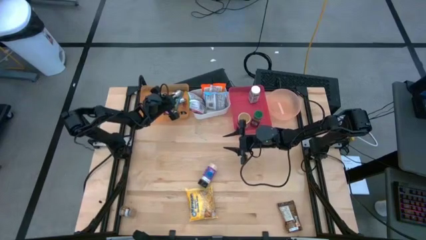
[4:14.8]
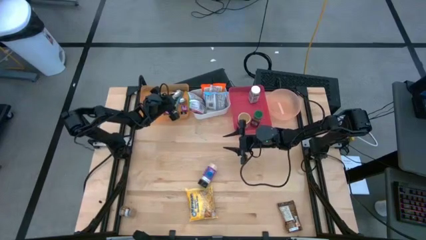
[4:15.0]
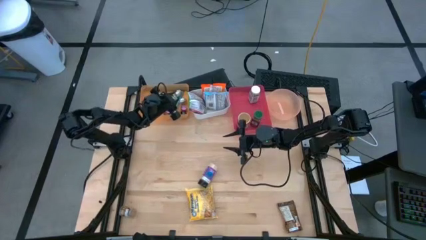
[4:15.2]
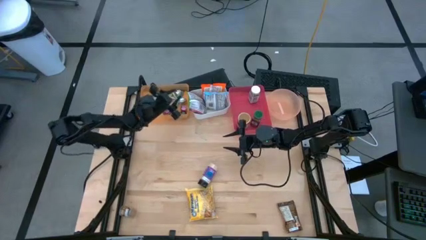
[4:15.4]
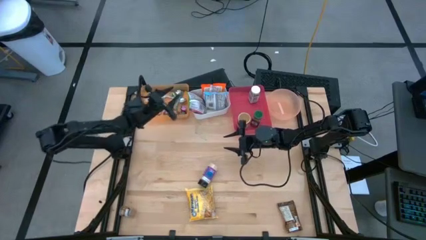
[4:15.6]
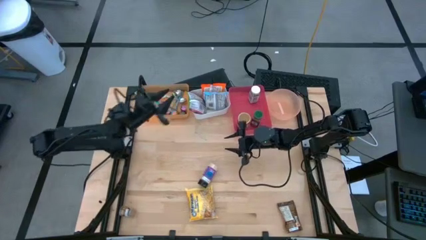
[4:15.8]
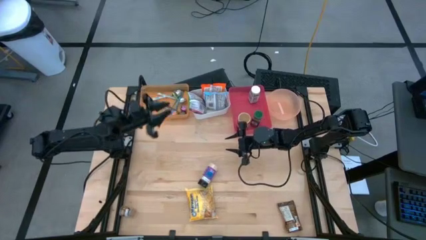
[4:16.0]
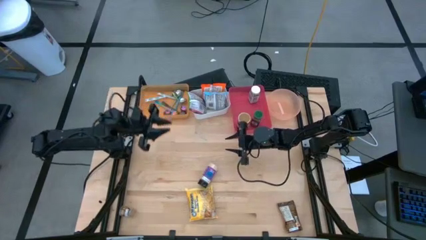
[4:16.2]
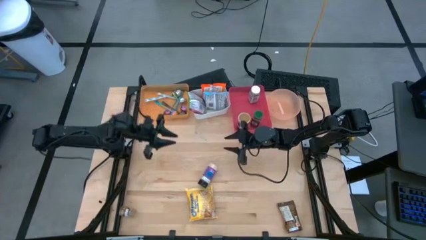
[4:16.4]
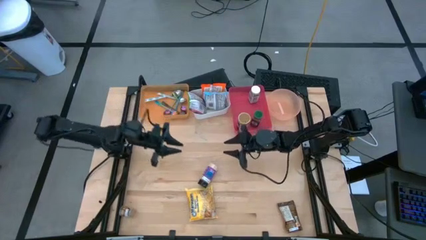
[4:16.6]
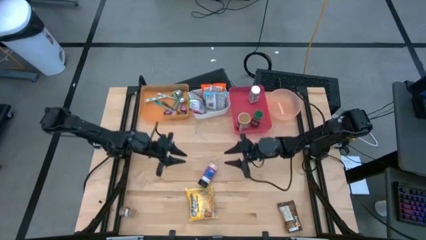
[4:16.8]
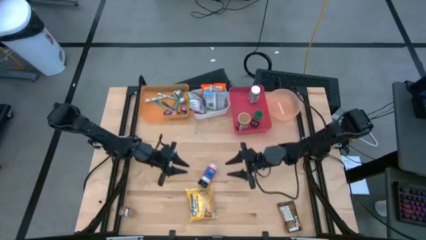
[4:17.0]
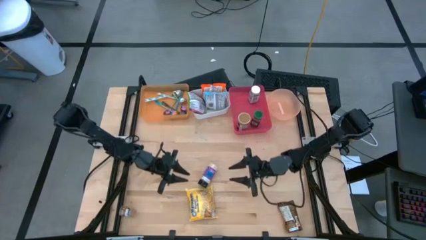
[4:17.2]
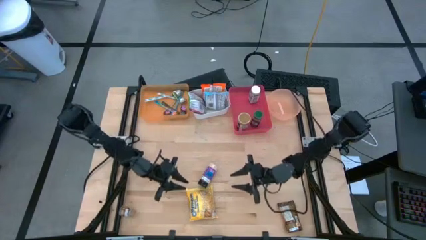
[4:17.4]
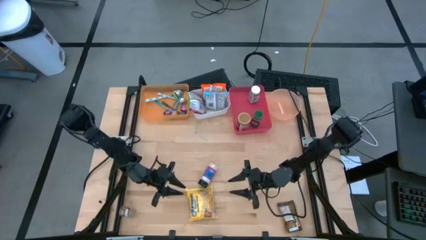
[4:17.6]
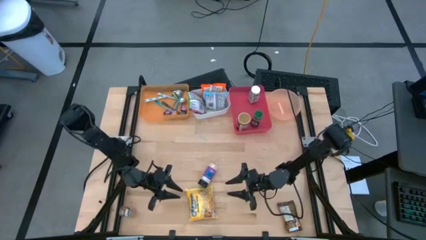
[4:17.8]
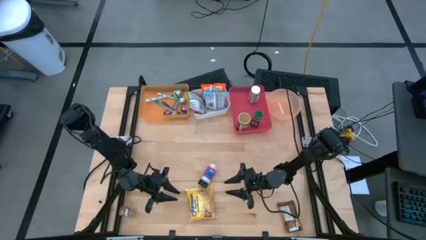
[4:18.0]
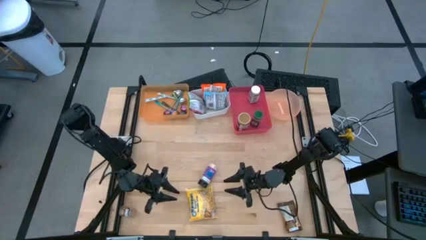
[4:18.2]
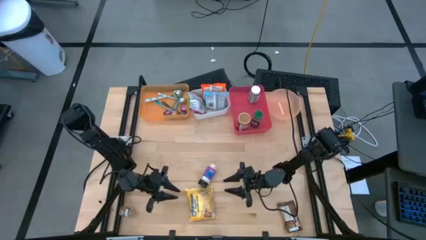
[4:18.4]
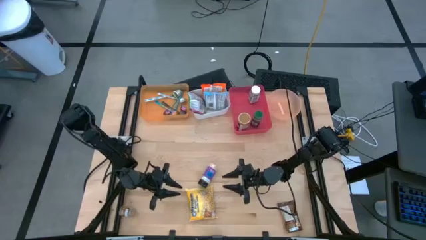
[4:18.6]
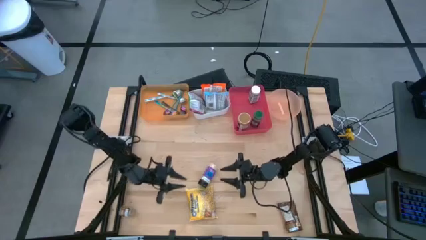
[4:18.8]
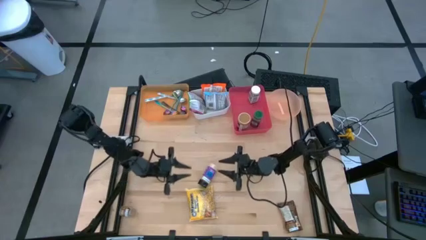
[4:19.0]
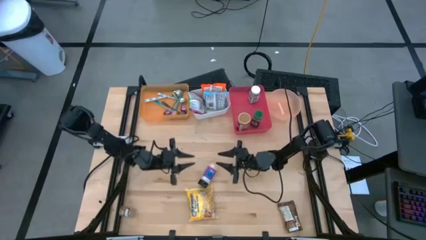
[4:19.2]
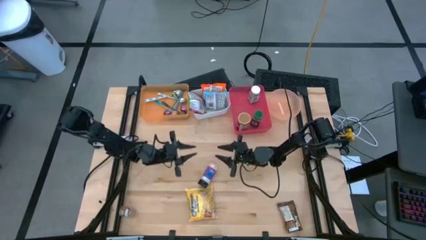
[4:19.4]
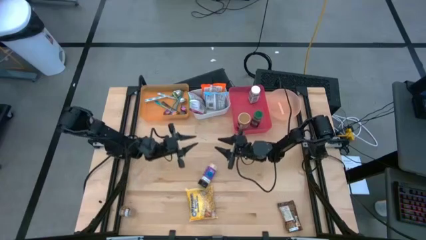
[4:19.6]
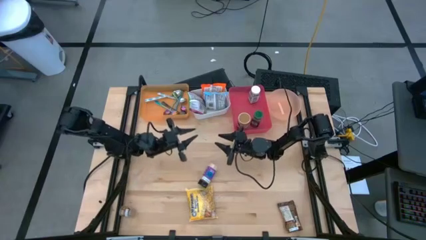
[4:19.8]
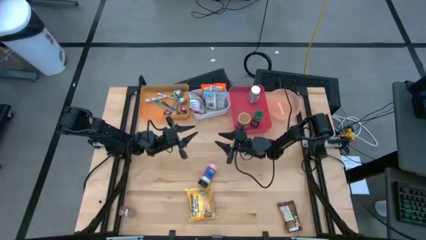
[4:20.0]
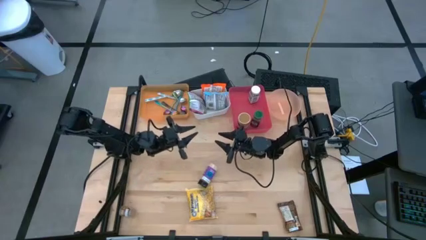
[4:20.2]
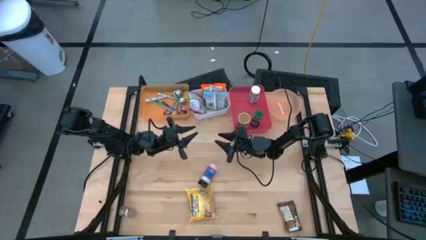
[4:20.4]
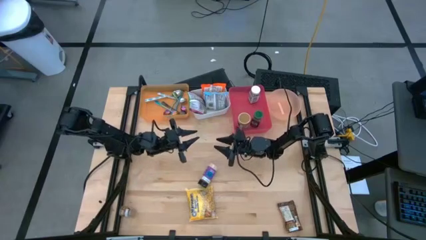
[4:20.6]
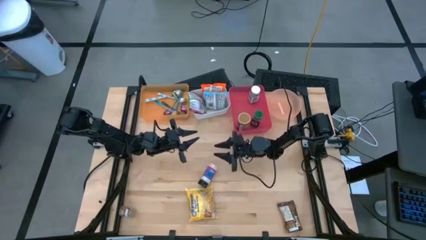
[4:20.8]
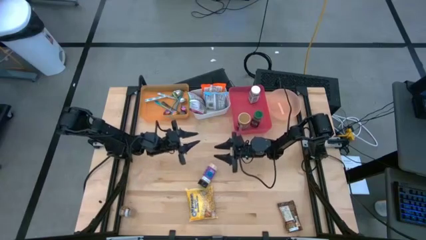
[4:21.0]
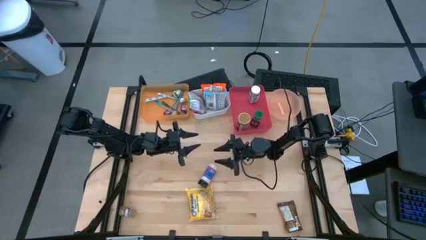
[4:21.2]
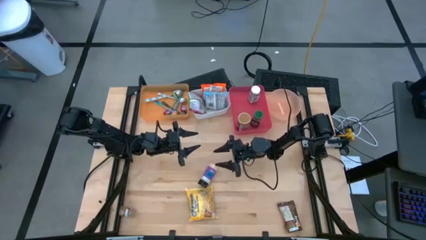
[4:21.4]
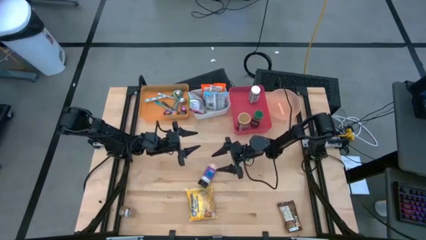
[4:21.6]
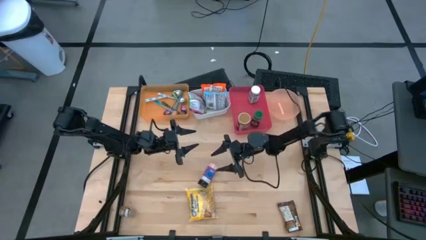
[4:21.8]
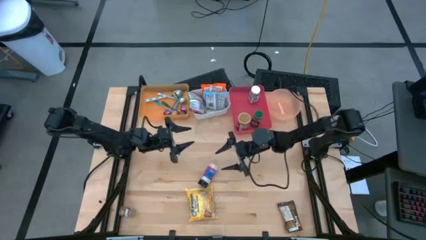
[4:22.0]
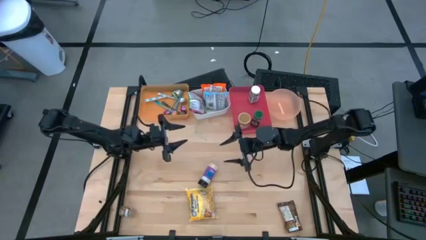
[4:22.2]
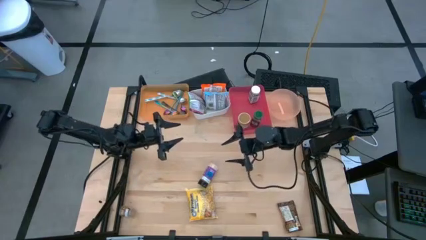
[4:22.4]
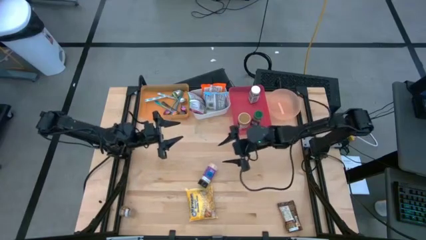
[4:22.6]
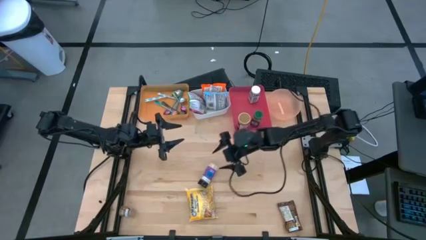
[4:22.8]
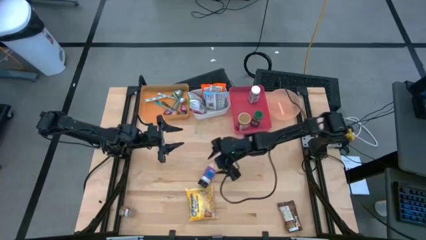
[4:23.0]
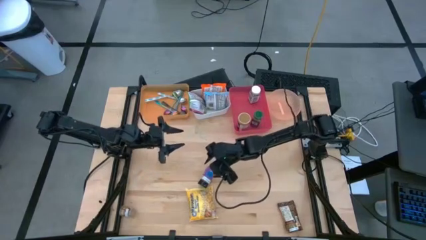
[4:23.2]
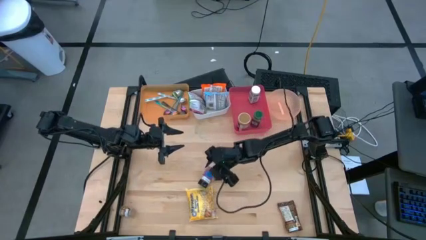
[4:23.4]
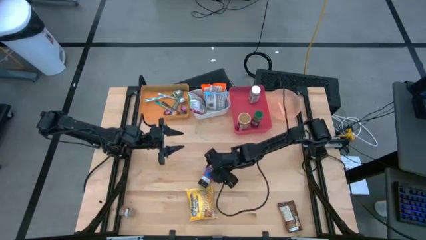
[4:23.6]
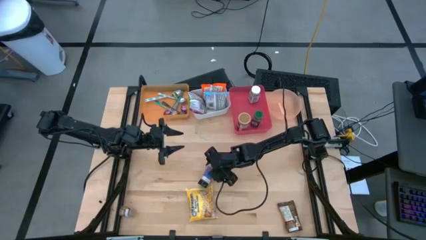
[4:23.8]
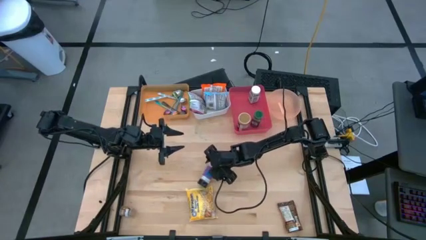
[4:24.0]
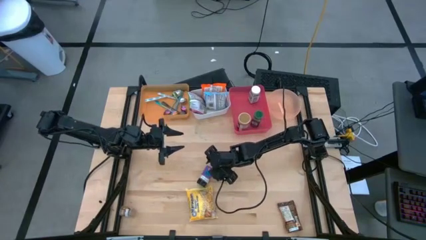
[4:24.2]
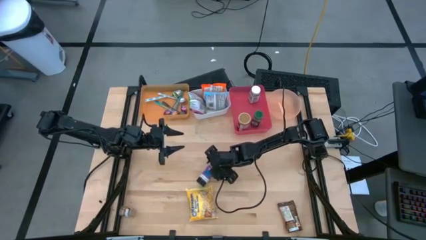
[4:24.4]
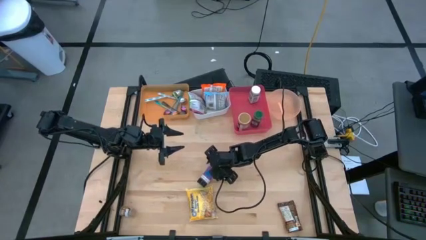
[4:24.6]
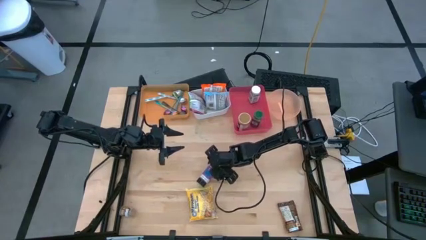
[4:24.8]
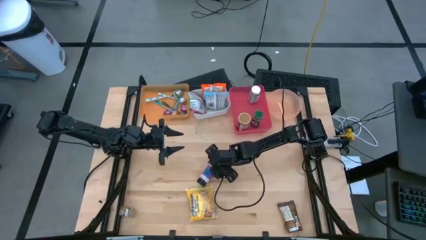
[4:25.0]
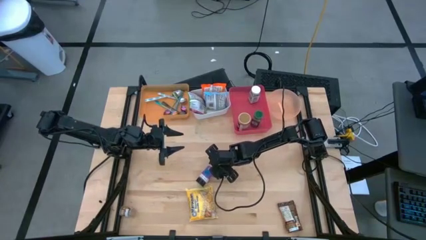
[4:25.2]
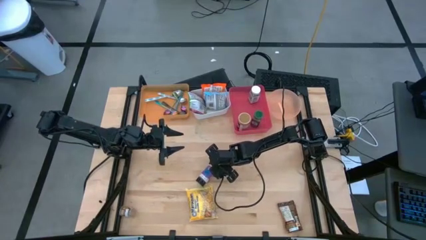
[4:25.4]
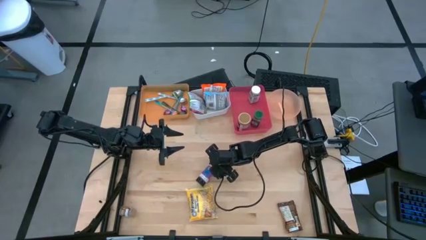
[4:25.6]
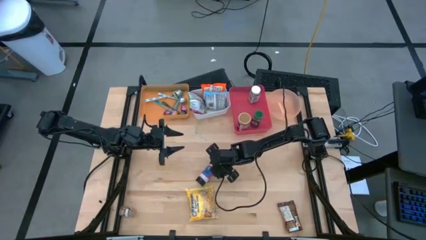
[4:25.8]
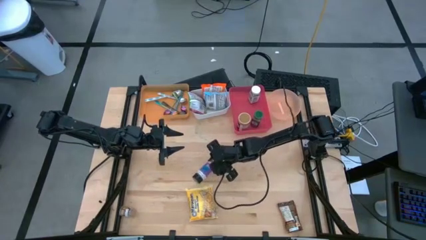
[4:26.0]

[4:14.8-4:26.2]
Task: Pick & Place Food Item
Put the purple seasoning bottle into the pink bin
